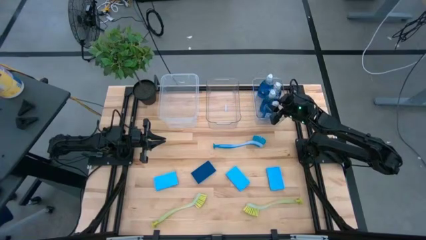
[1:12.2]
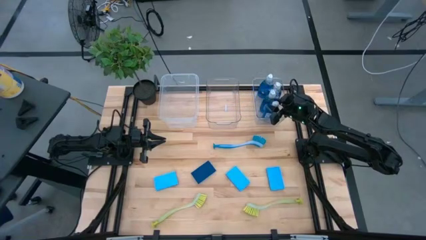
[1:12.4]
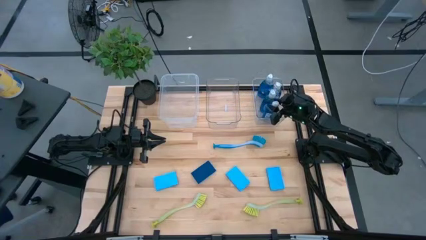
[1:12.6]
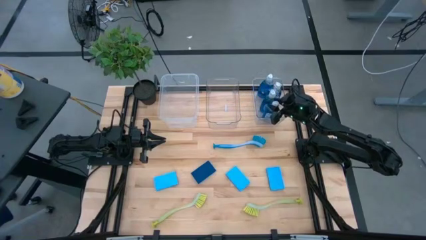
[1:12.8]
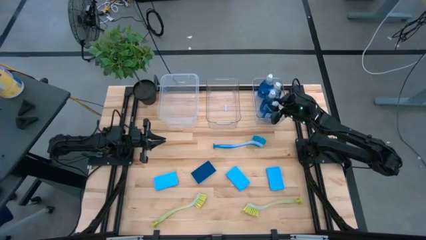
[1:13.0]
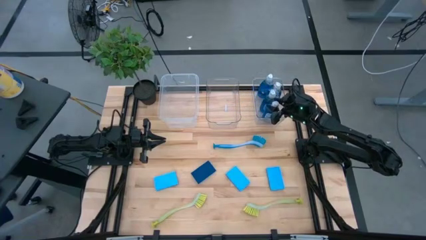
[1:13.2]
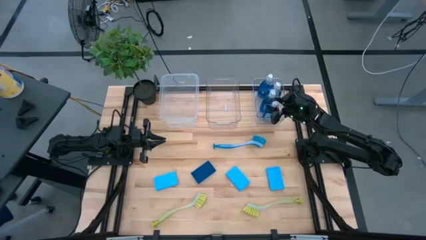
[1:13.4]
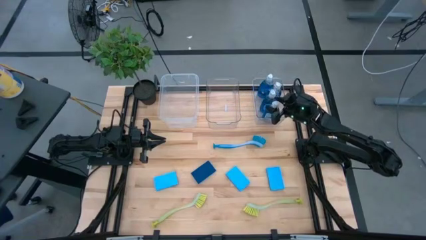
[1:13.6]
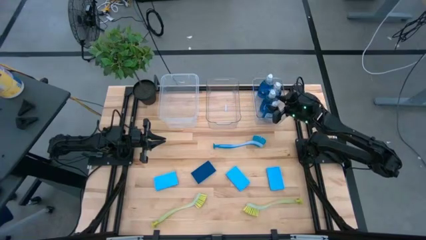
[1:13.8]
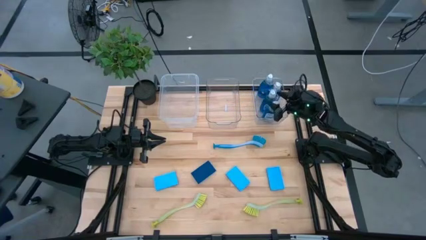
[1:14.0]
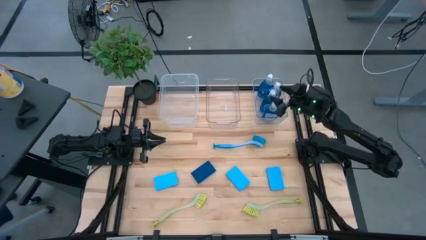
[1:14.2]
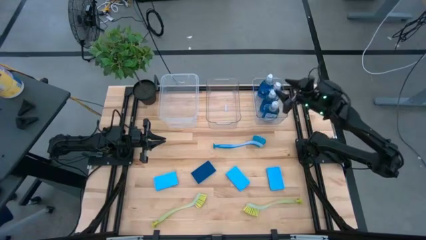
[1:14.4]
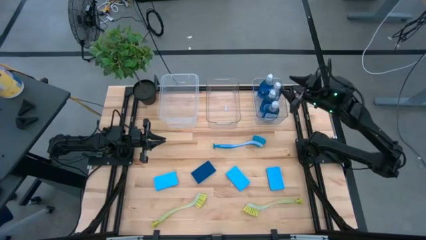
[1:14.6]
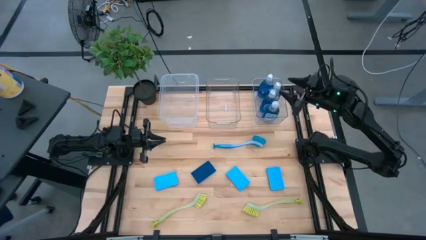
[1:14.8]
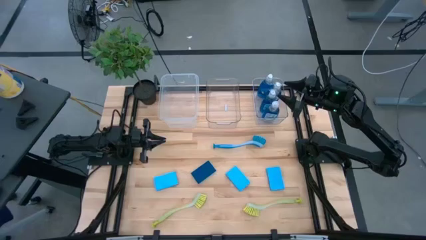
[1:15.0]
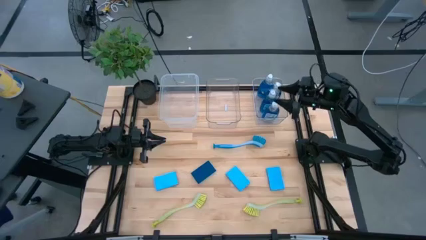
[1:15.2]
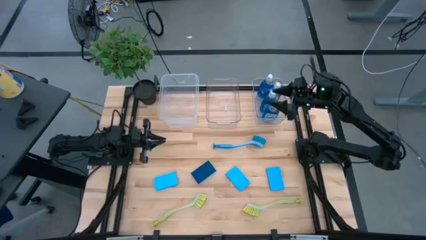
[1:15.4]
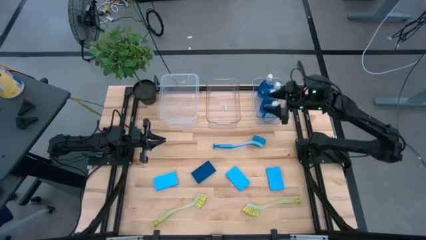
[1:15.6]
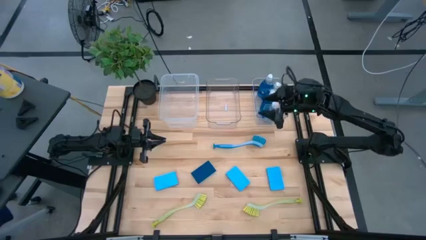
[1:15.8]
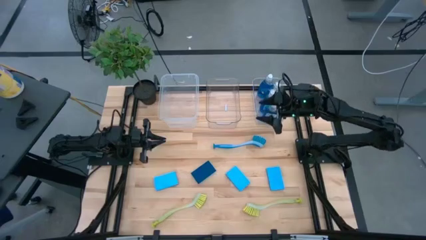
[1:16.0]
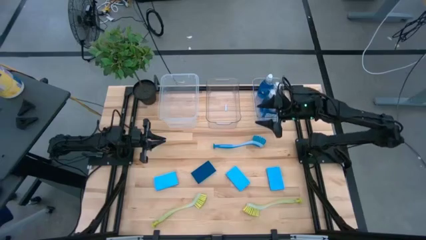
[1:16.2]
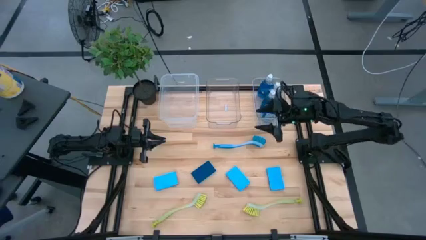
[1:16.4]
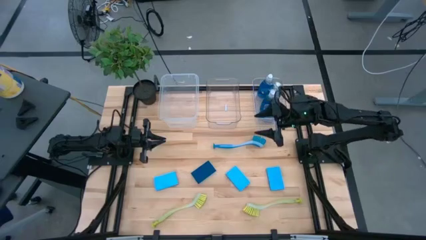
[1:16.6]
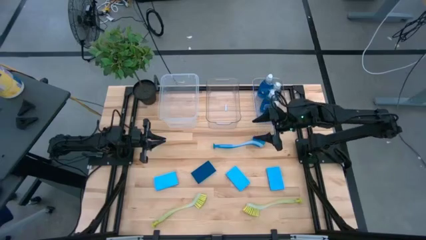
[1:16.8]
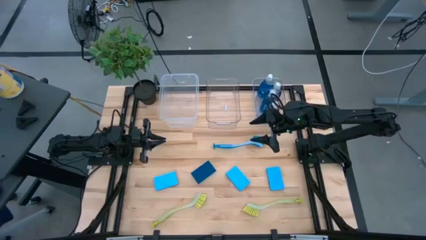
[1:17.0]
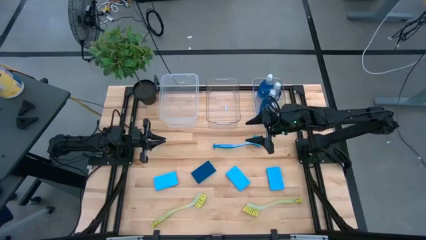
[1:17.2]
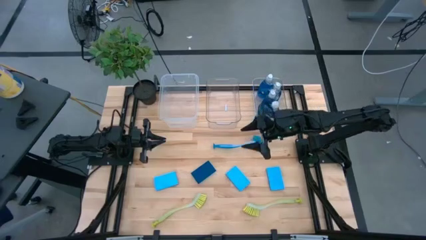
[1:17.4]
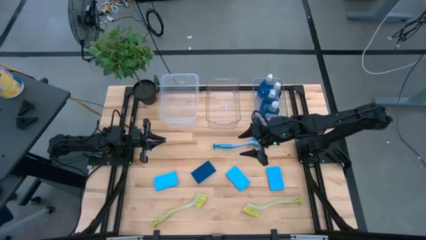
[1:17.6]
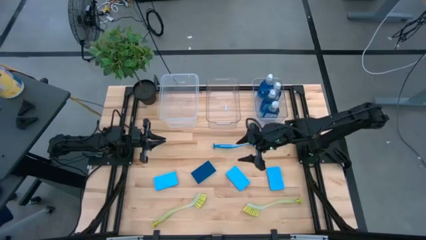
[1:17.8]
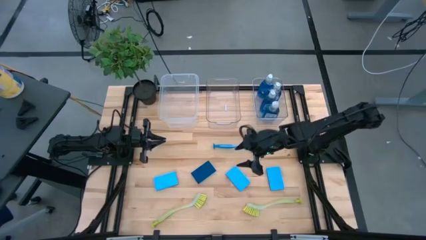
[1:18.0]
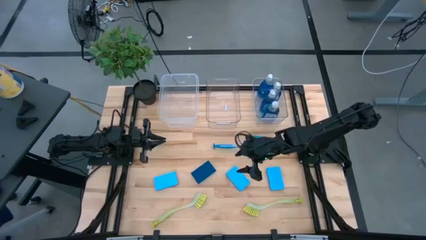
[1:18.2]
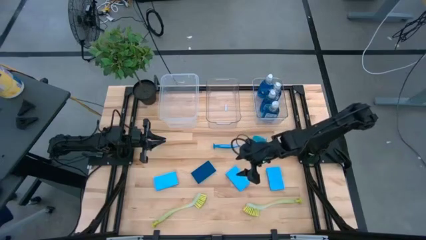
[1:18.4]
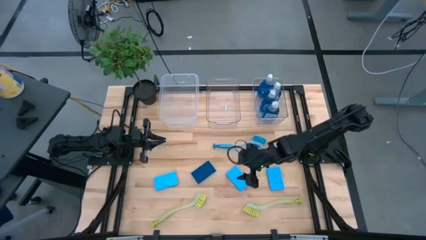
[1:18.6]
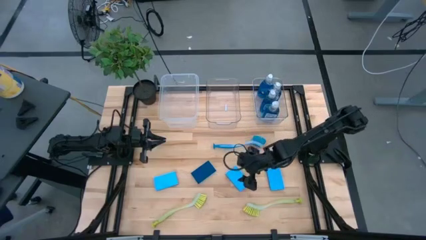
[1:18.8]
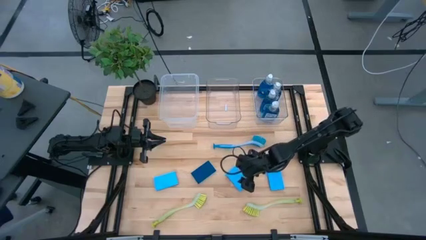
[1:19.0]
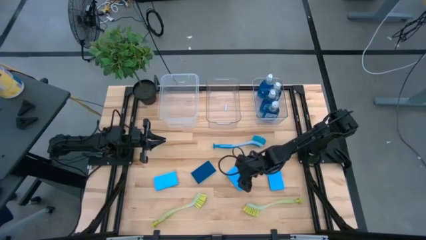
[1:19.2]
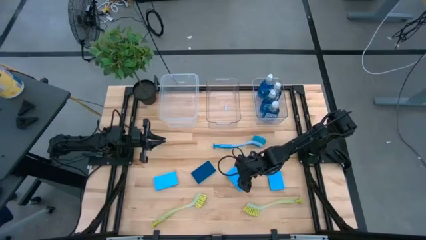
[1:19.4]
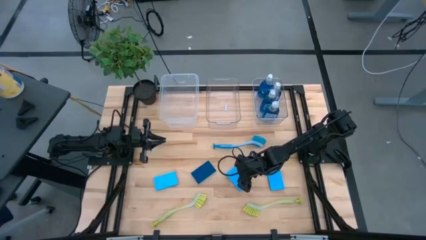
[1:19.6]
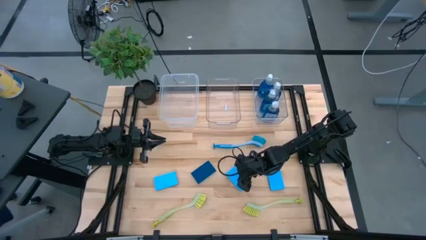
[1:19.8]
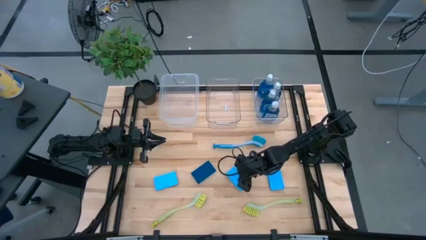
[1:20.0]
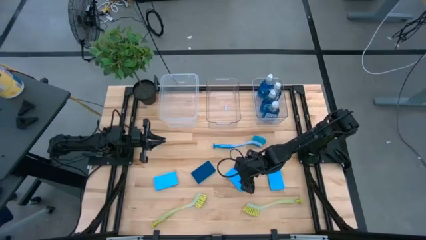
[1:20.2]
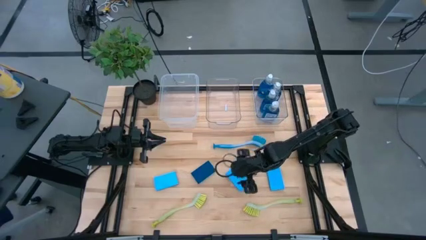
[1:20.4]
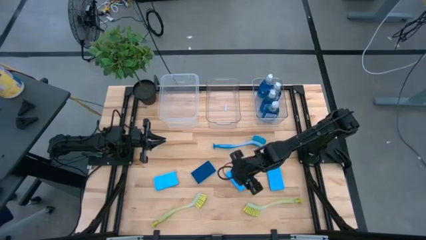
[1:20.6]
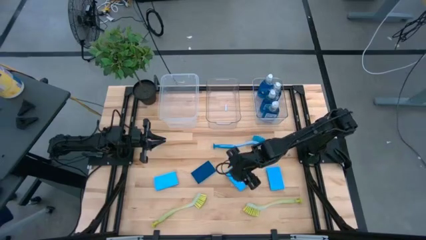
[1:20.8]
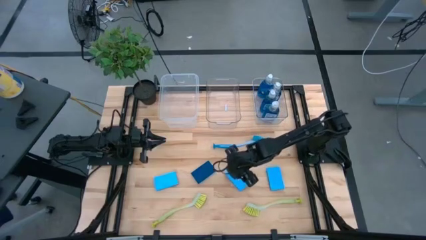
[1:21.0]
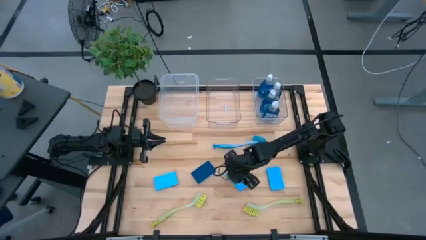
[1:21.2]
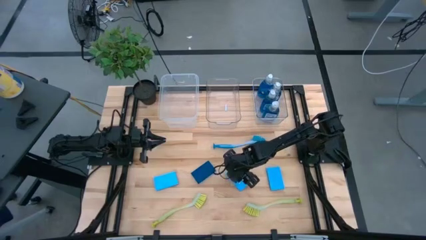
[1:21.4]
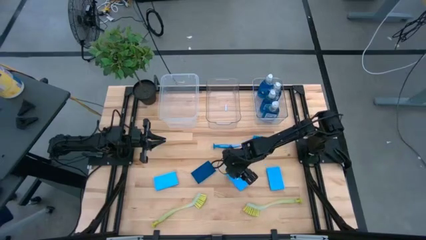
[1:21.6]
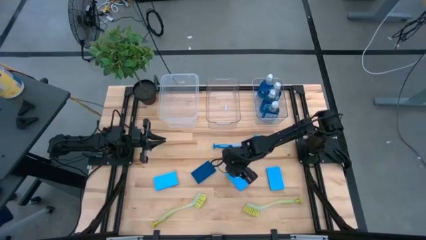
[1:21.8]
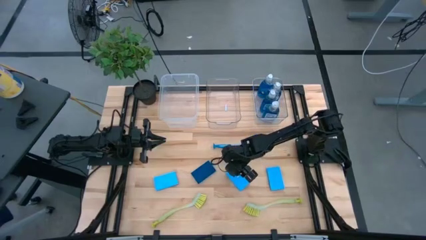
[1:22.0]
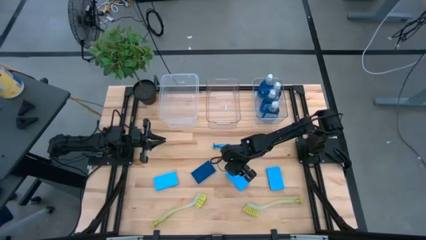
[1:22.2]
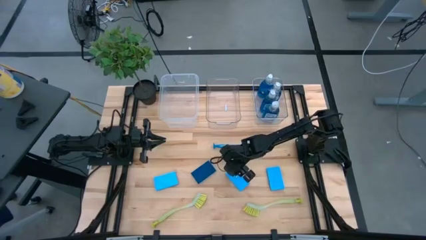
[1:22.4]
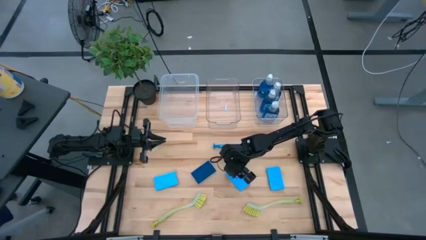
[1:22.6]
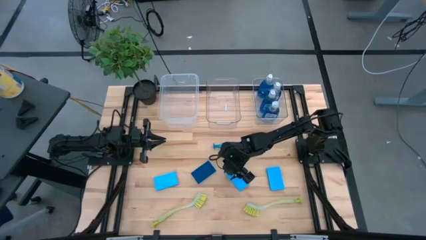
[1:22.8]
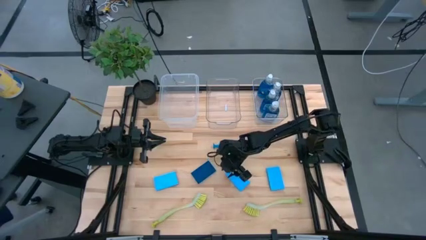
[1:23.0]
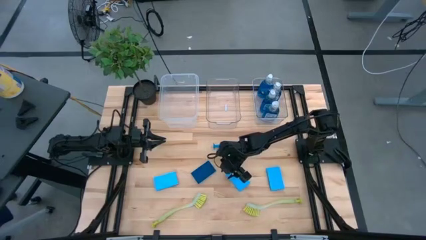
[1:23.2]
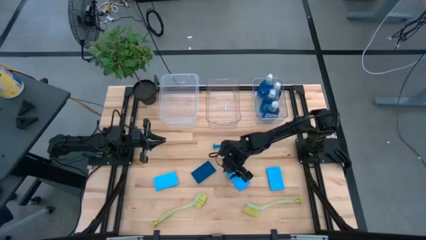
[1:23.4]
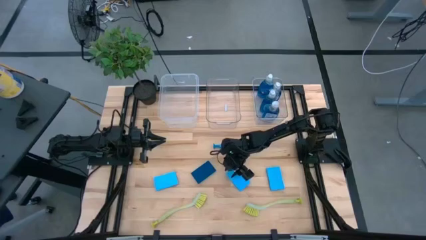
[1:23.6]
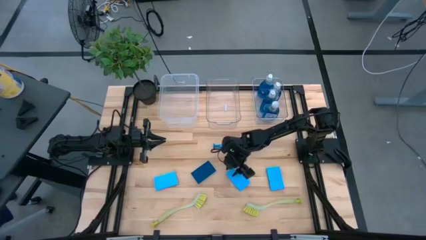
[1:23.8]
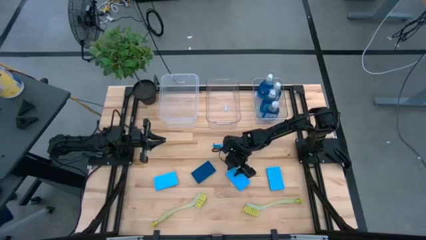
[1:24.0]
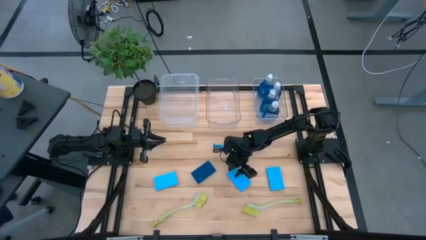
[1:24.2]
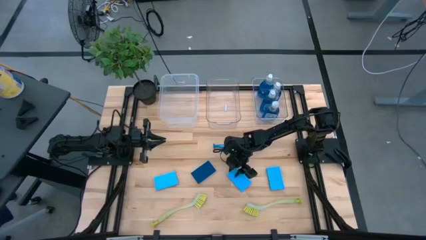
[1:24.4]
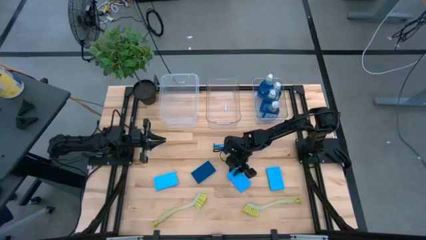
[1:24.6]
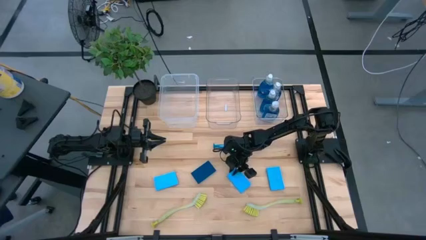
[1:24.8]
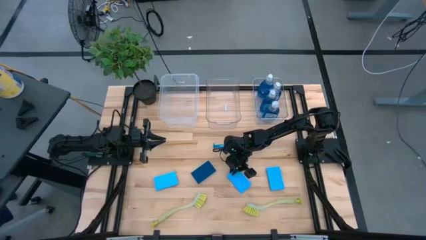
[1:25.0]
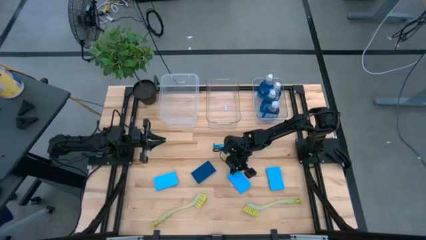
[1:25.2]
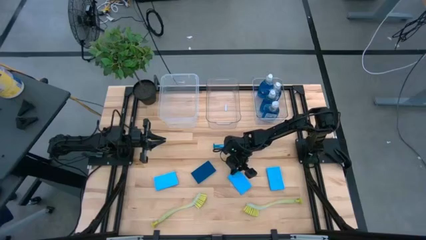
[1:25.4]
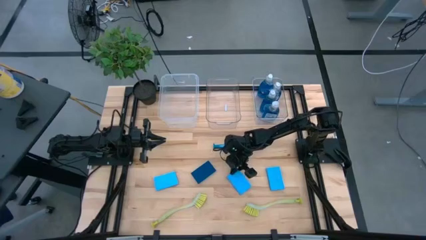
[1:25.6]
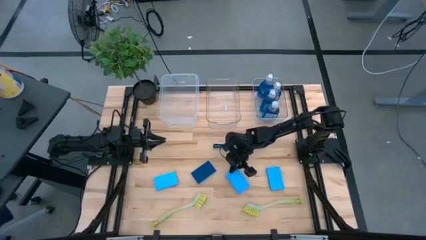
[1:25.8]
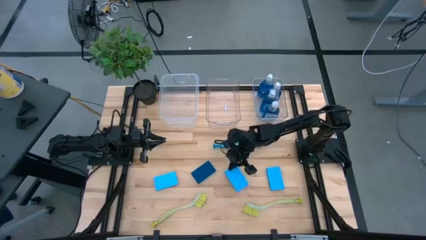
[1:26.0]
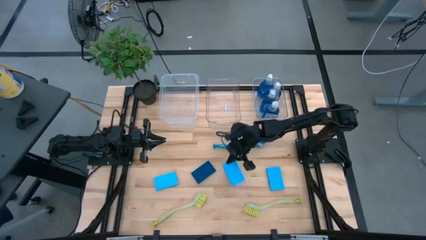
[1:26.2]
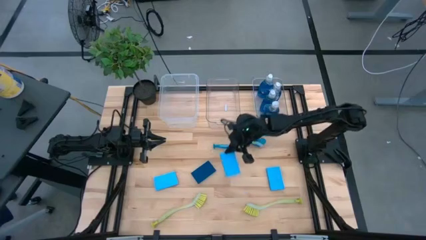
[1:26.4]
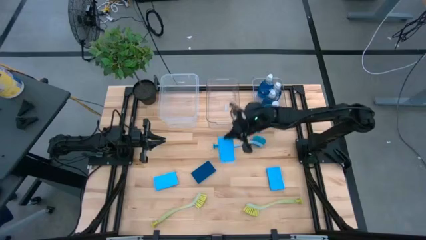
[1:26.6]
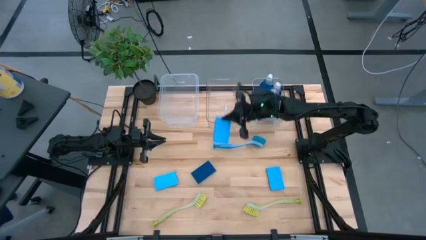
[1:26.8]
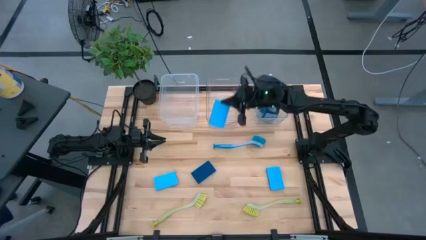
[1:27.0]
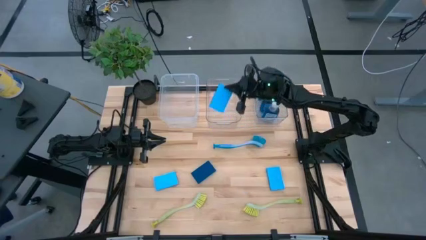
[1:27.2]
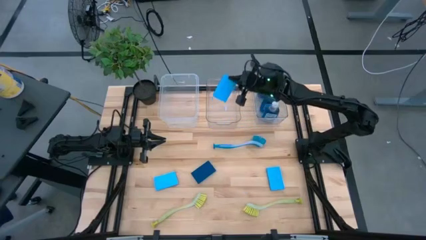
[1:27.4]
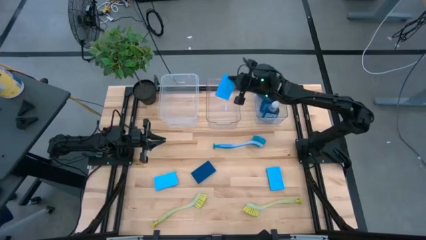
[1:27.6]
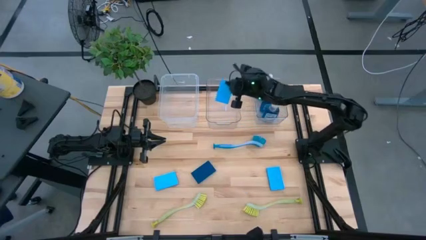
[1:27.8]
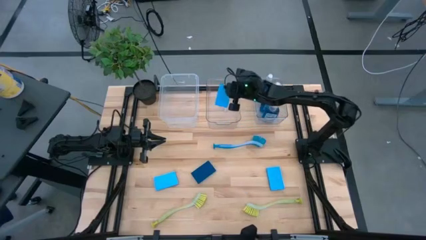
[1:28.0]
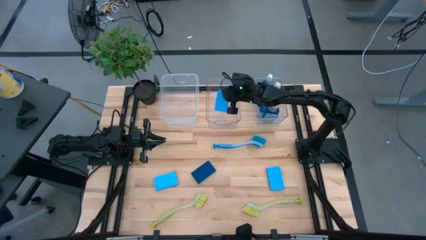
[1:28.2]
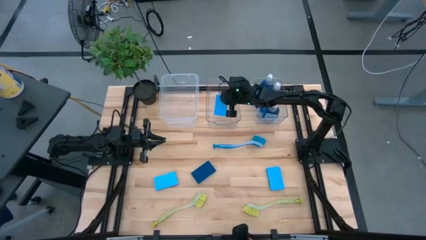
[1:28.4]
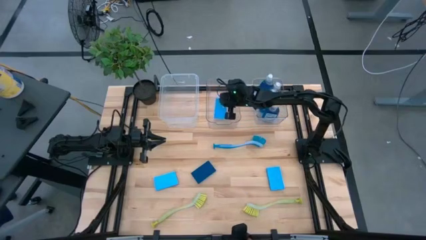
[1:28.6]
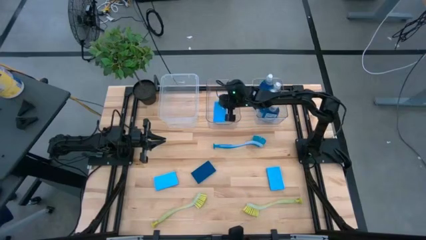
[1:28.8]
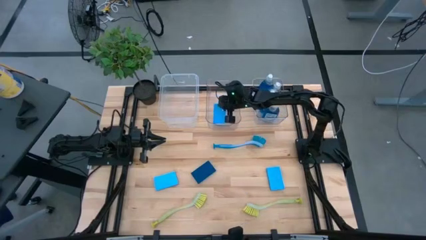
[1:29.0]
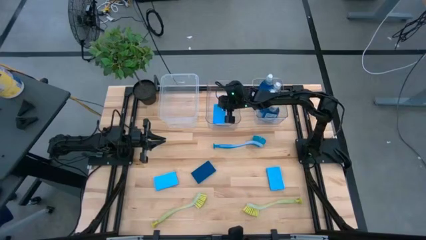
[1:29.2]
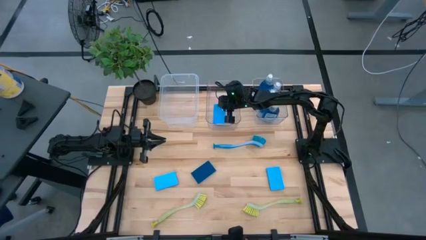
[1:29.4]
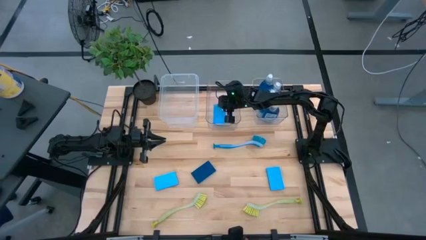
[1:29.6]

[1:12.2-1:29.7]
Task: Pick & Place Kitchen Sink Supplies
Put the blue sponge into the middle transparent bin
